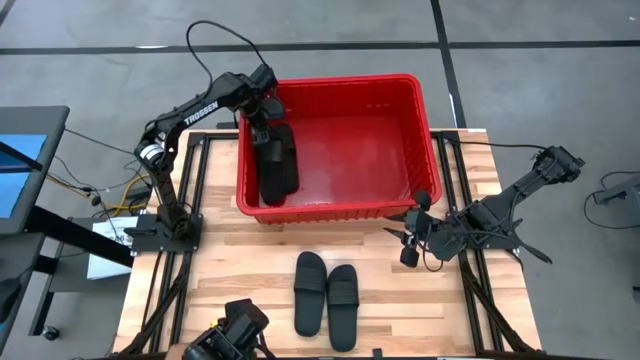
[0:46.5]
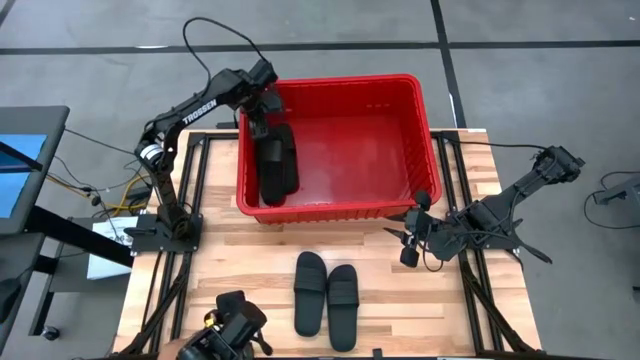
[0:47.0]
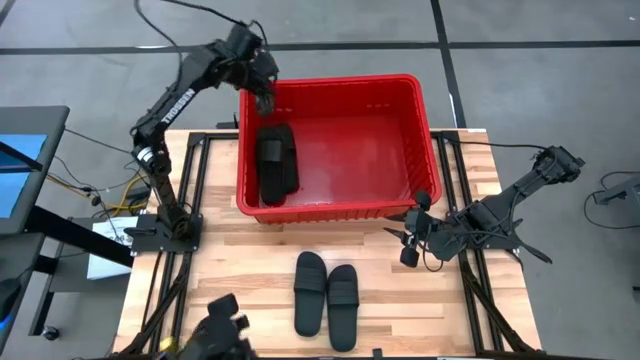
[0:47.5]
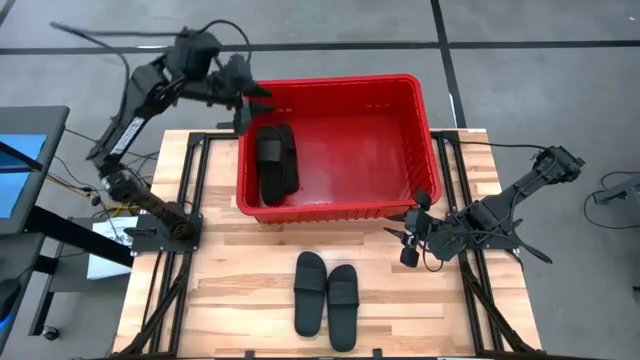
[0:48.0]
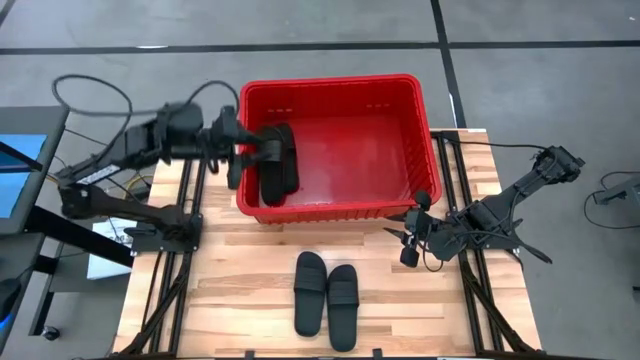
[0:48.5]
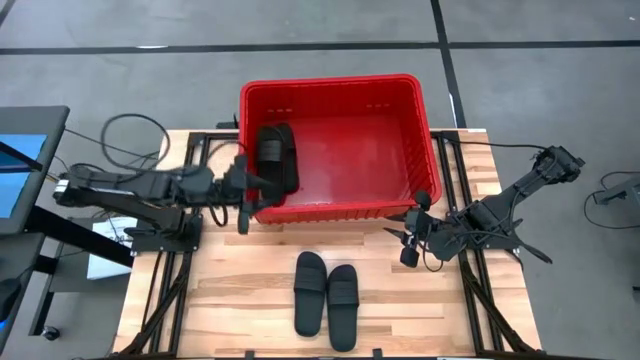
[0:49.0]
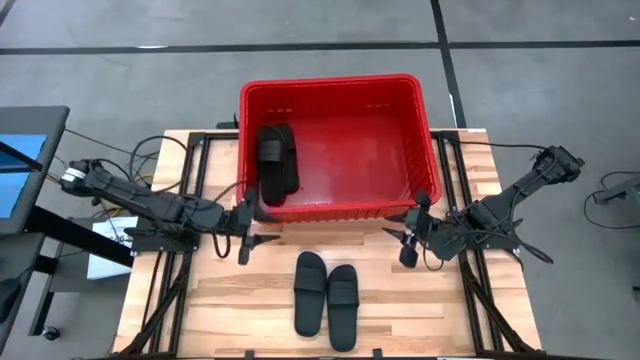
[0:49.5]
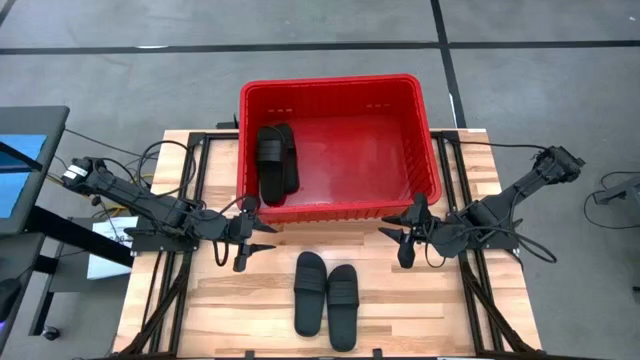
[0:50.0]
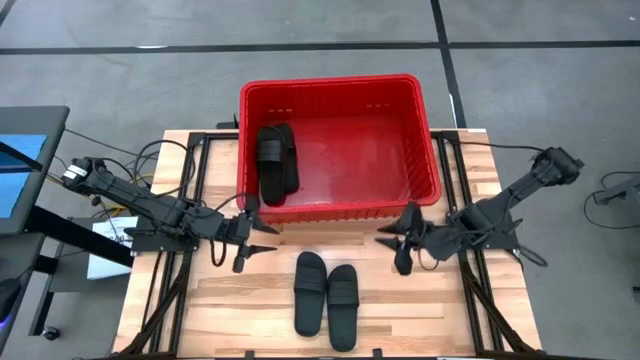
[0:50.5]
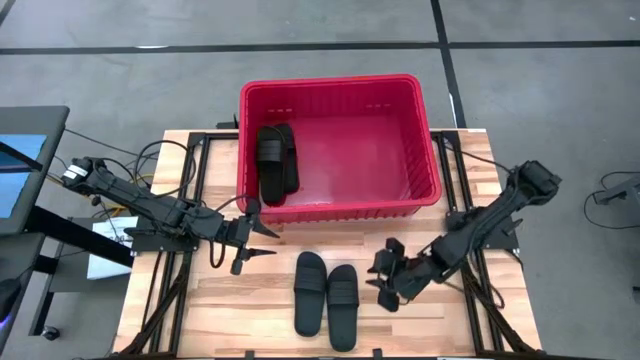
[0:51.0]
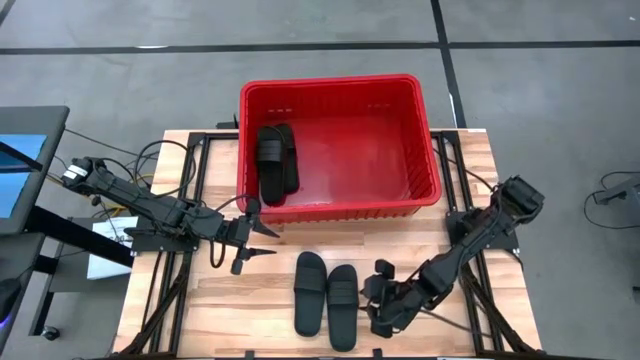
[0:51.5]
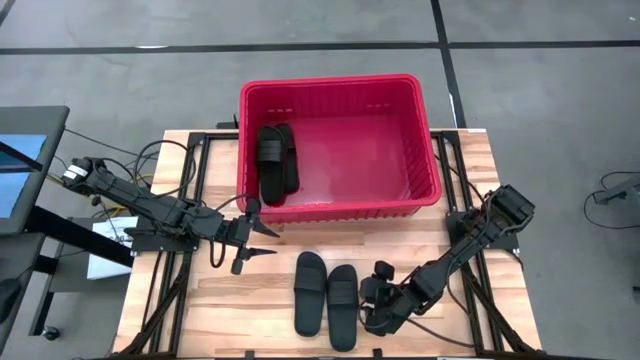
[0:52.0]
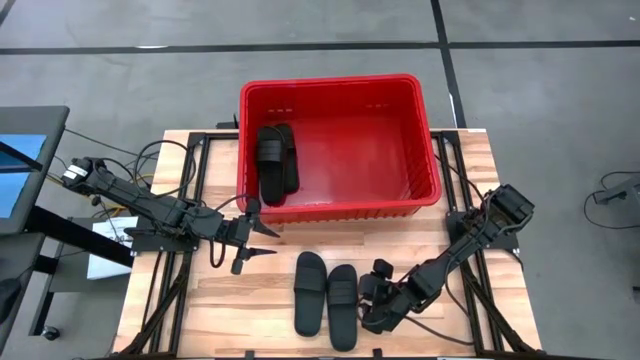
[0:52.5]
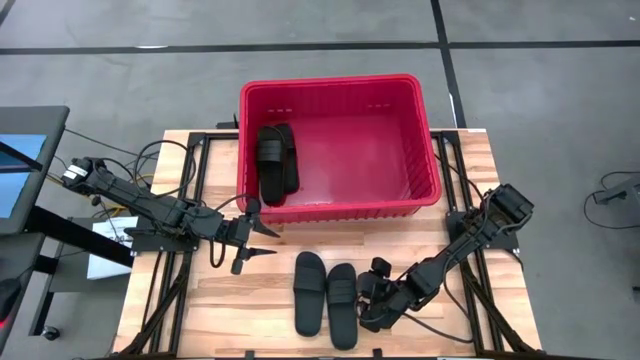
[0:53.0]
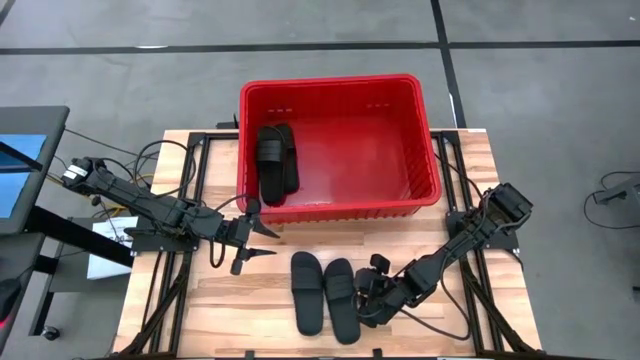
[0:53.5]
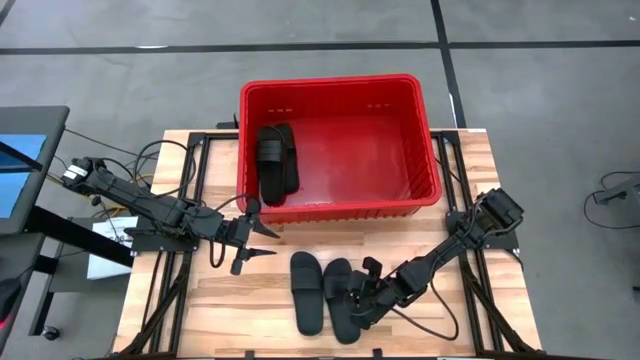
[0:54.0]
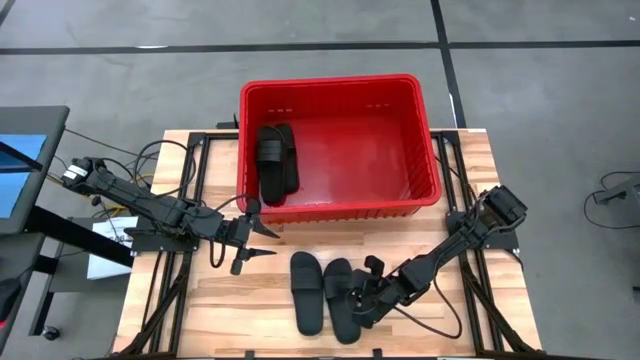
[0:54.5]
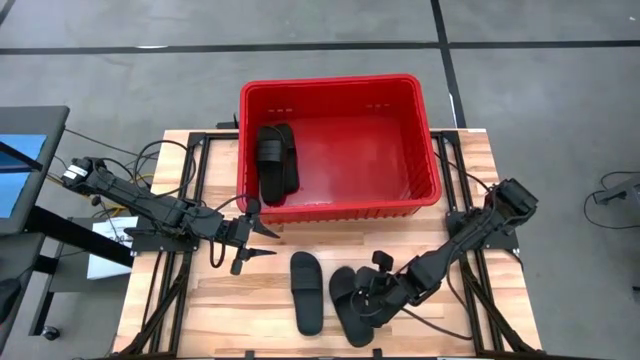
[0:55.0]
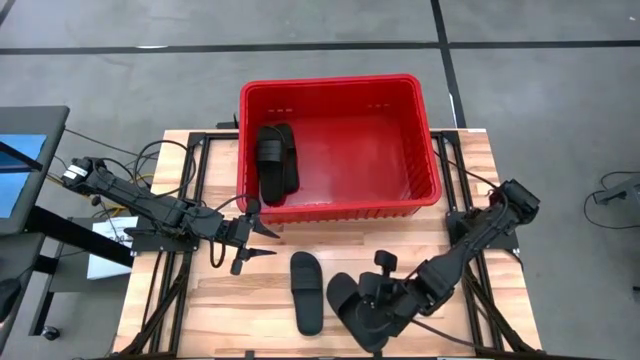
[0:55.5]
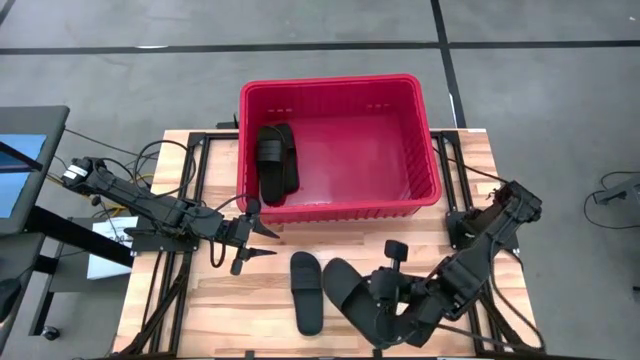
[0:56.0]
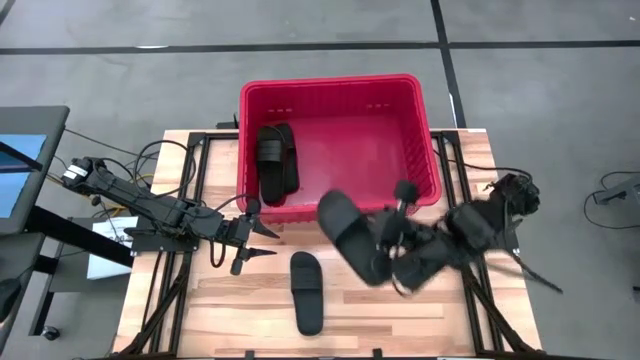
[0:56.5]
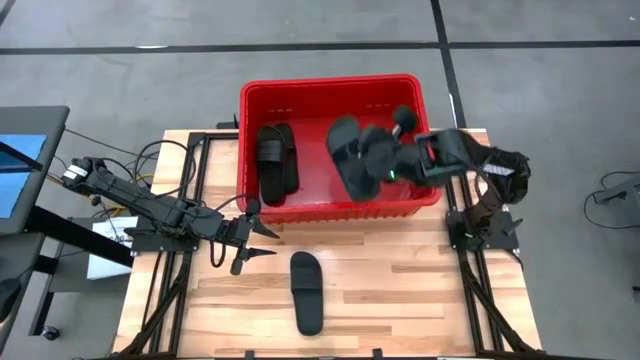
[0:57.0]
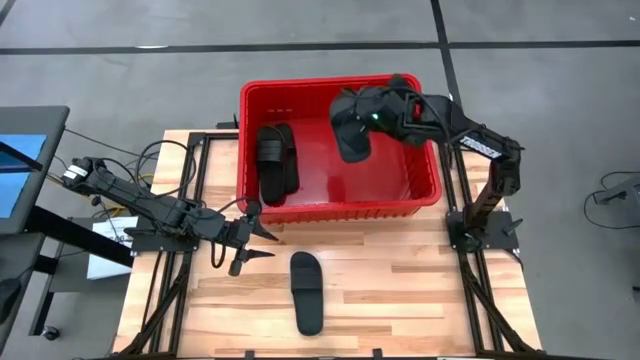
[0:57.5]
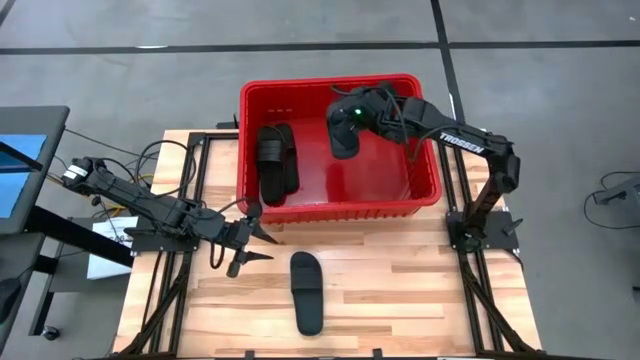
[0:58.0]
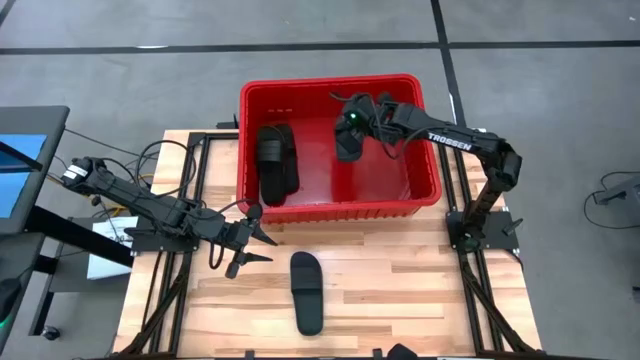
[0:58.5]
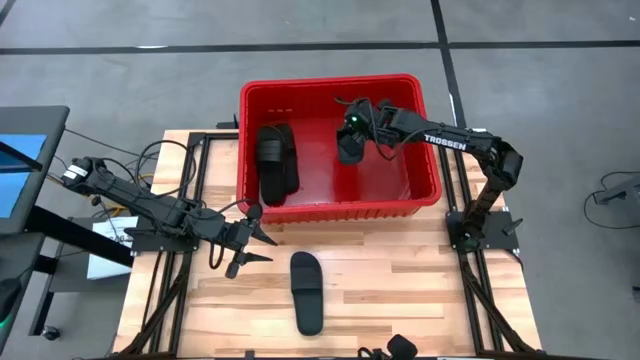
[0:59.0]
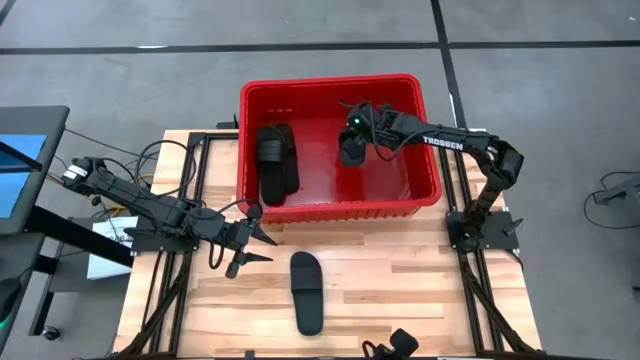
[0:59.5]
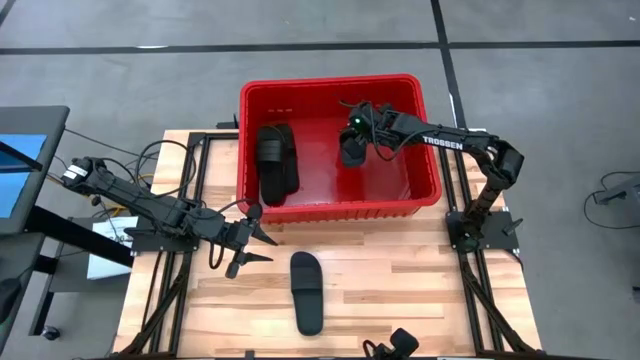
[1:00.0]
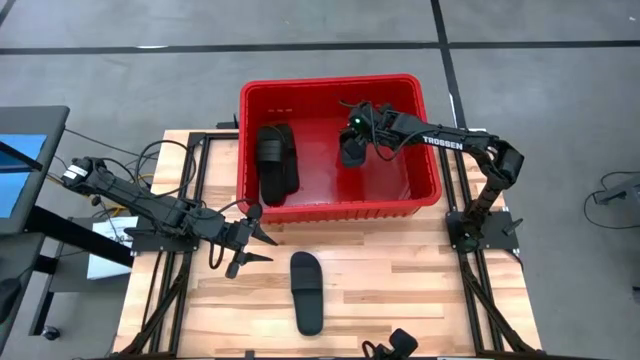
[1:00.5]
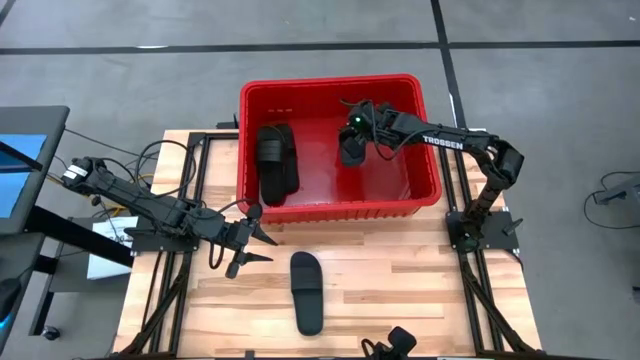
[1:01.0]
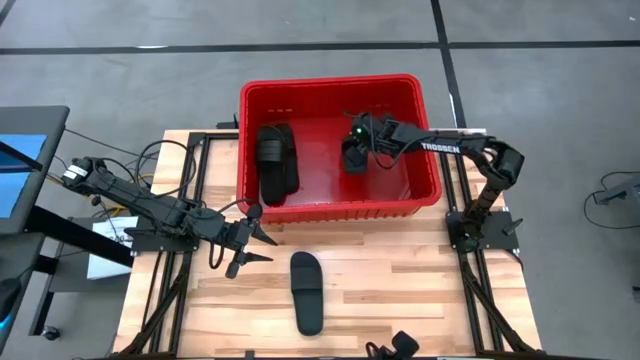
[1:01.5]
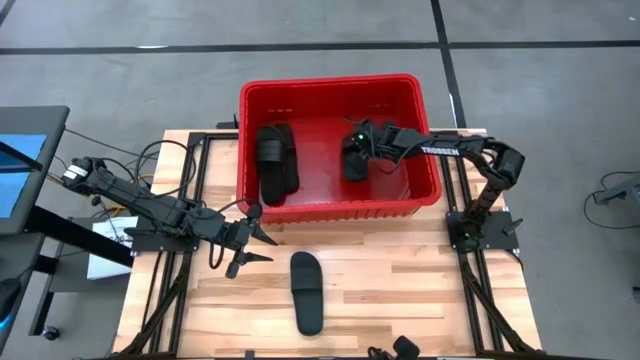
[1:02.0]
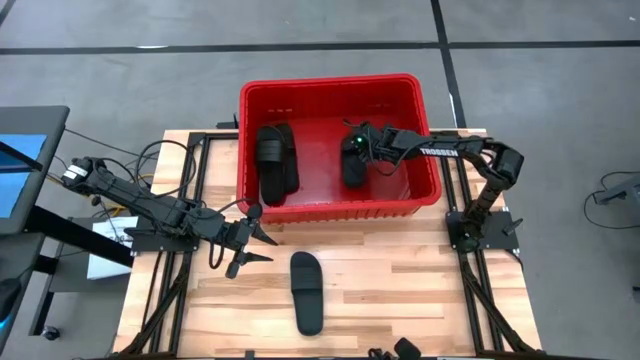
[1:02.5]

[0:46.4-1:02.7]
Task: Pick and place slides into bin
Put the black slides into the red bin

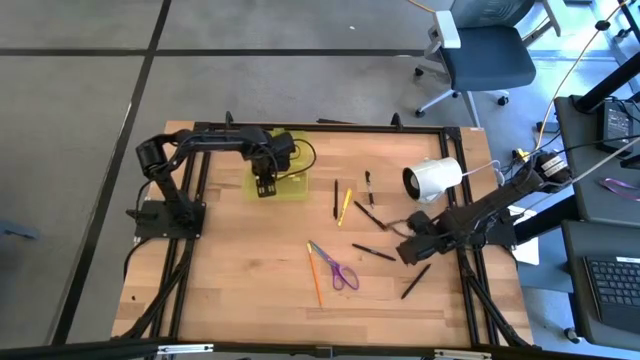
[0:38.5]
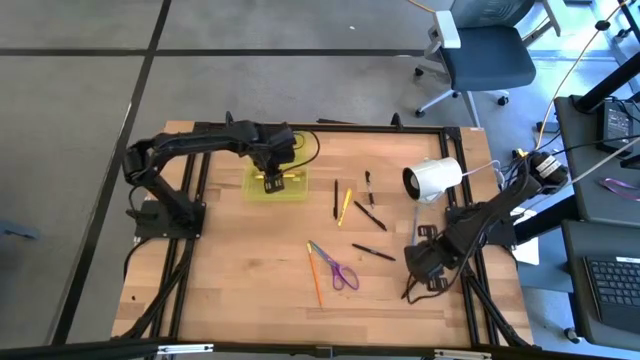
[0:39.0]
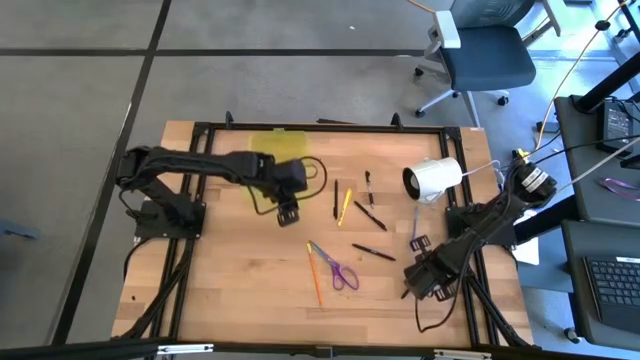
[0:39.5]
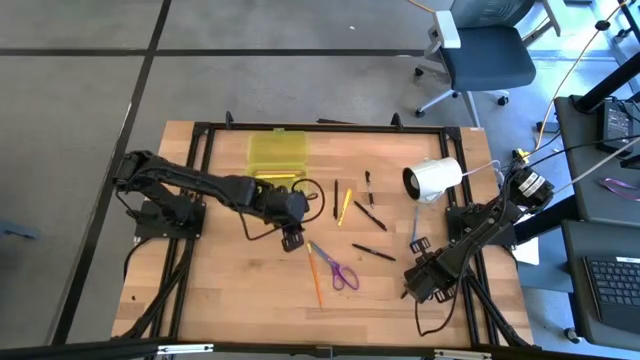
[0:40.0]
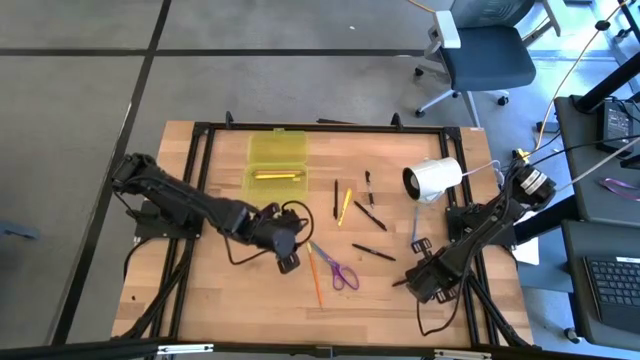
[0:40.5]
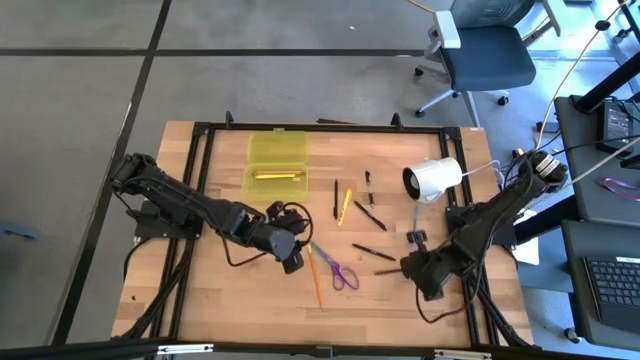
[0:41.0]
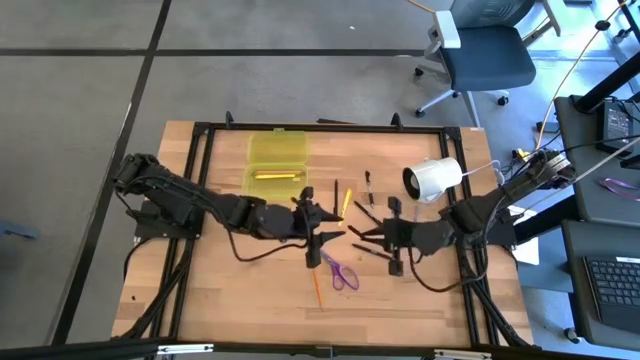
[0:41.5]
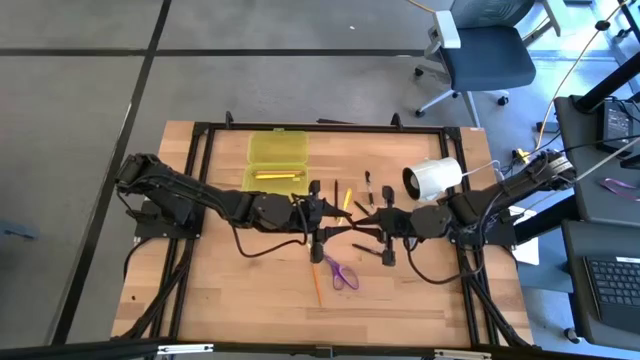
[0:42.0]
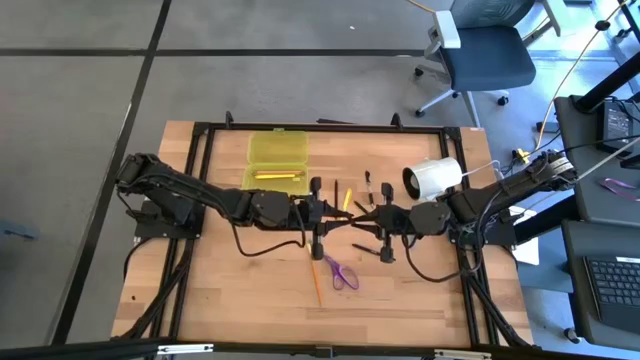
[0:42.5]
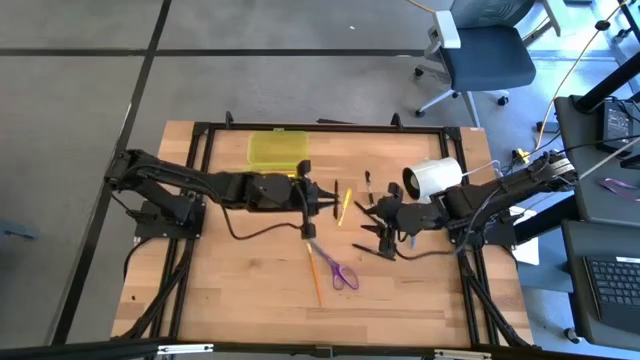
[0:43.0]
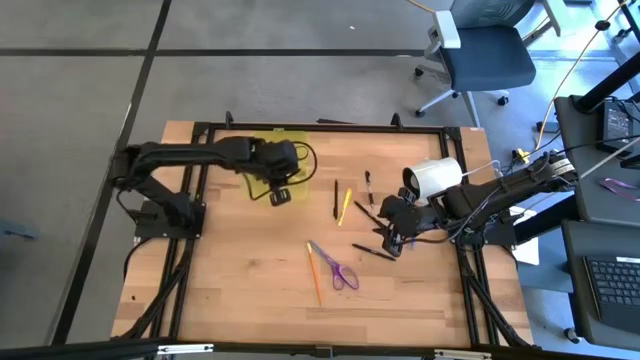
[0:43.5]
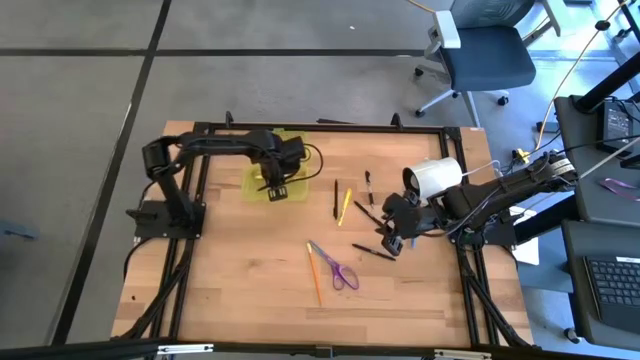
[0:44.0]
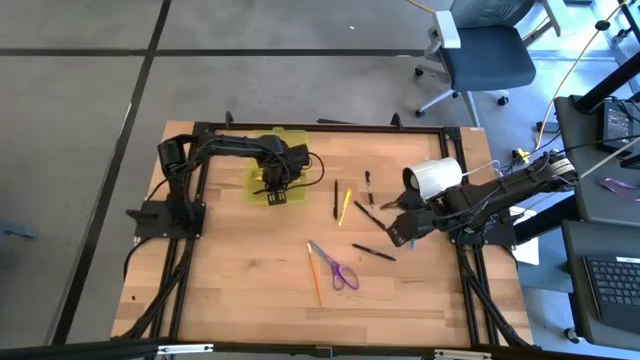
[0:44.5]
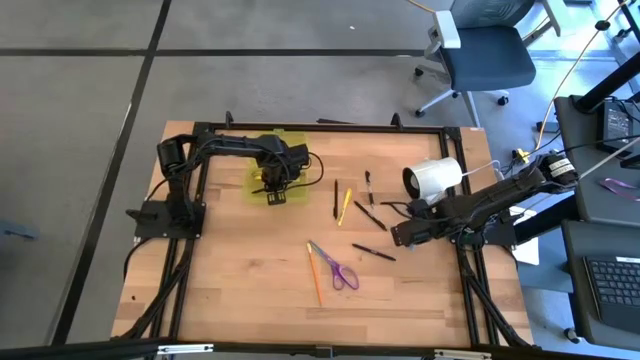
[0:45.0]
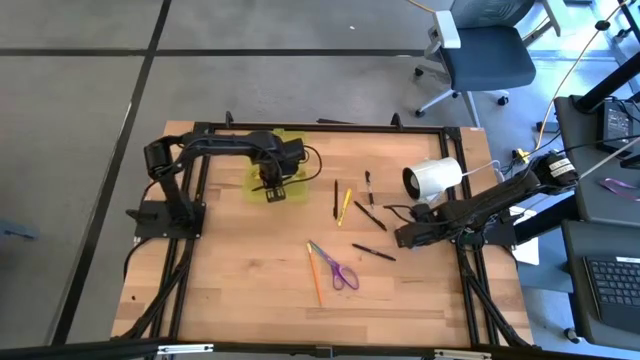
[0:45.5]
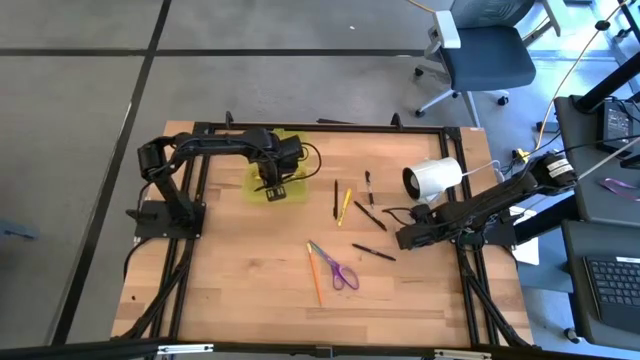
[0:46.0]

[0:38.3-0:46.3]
Task: Pick & place school supplies into a supply box
Put the black pen into the yellow supply box
